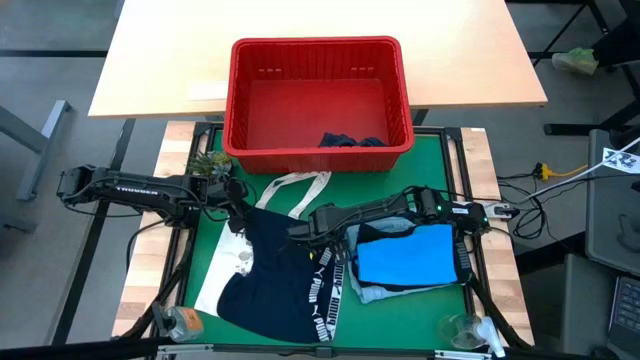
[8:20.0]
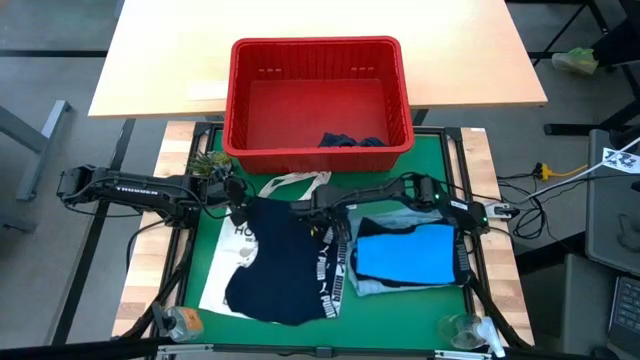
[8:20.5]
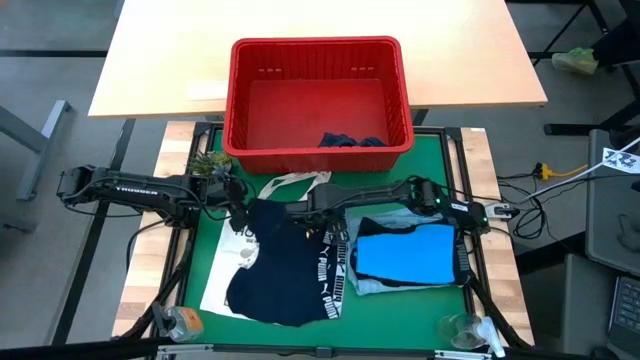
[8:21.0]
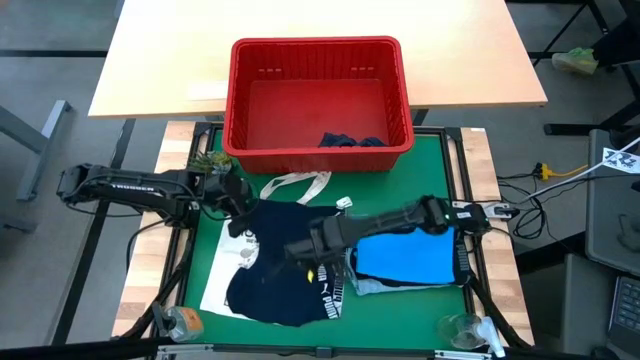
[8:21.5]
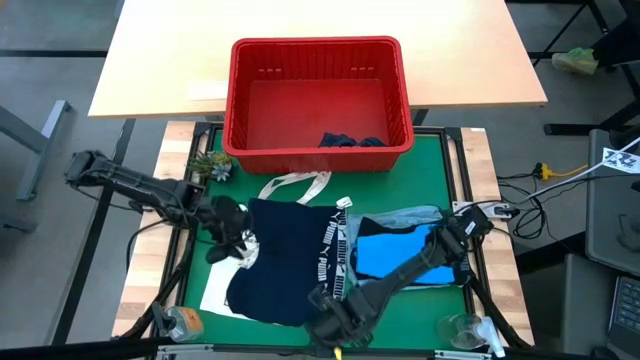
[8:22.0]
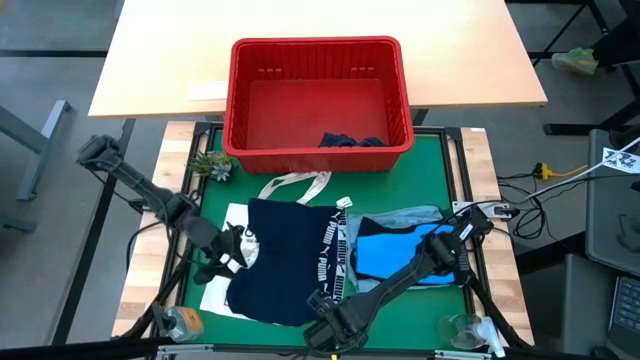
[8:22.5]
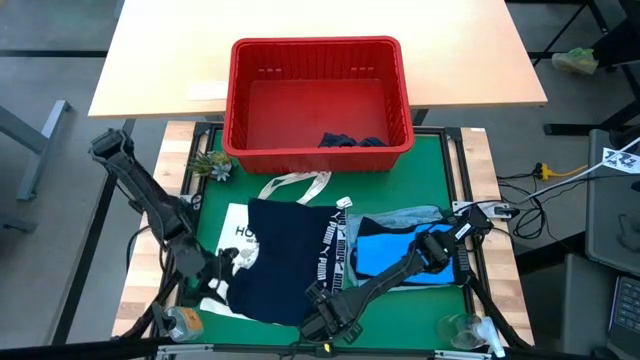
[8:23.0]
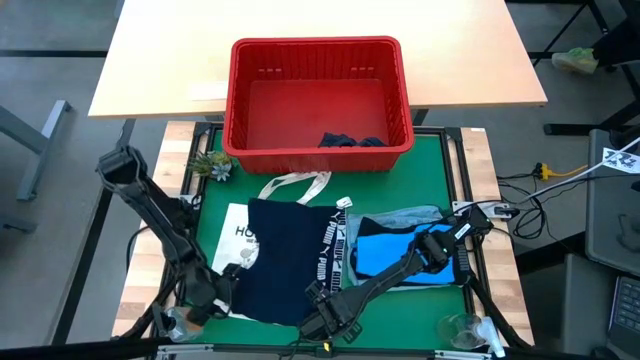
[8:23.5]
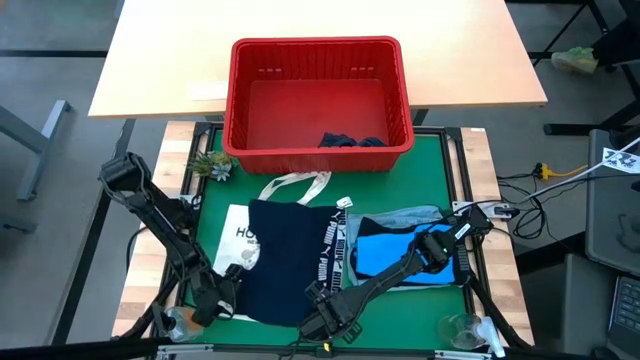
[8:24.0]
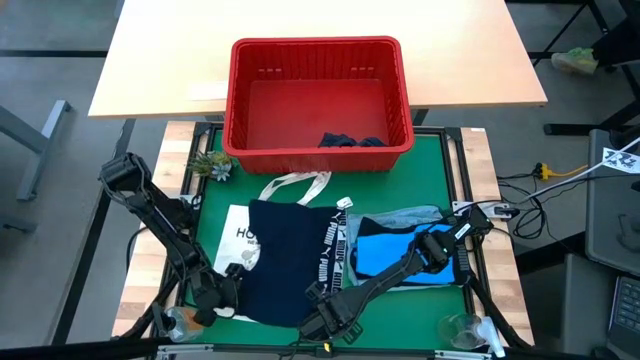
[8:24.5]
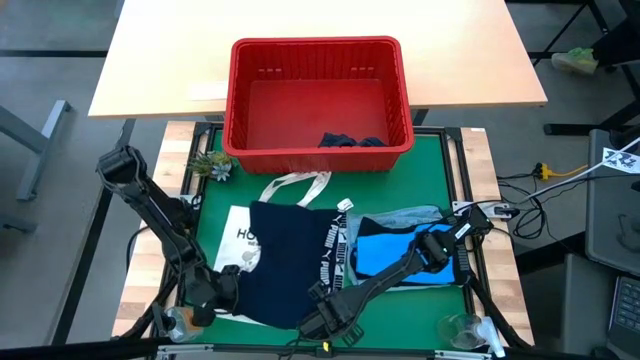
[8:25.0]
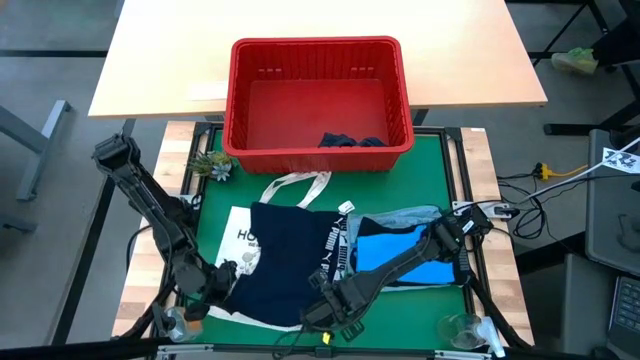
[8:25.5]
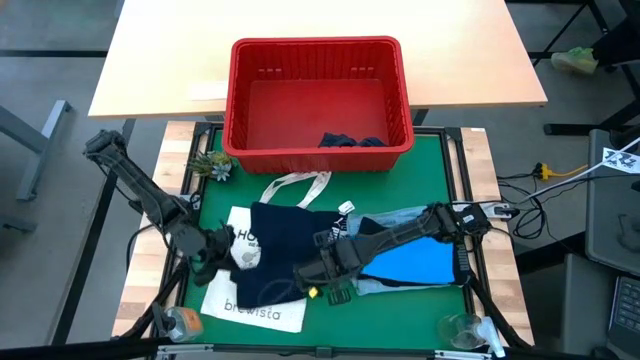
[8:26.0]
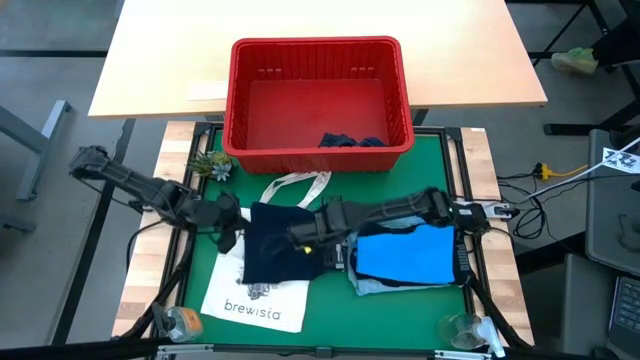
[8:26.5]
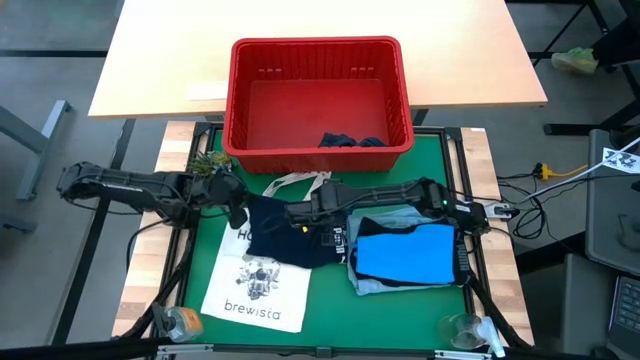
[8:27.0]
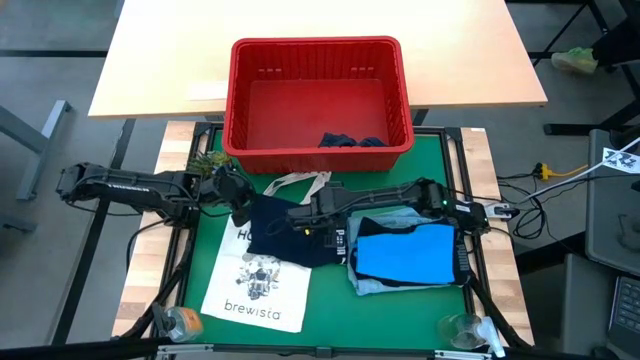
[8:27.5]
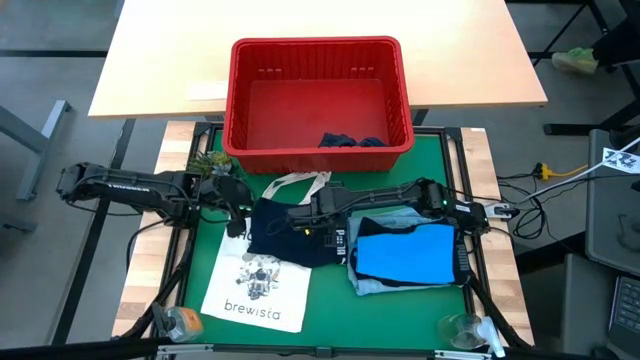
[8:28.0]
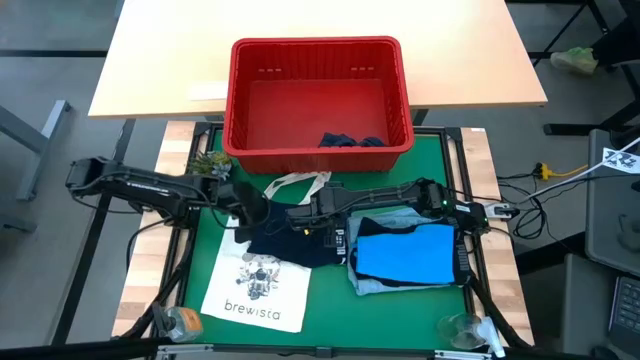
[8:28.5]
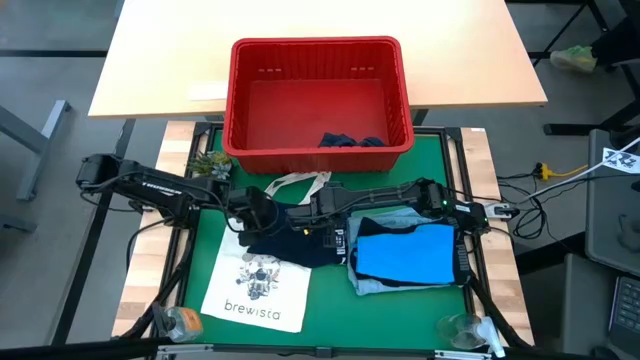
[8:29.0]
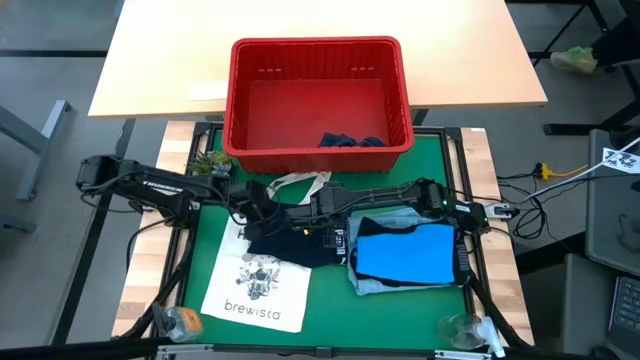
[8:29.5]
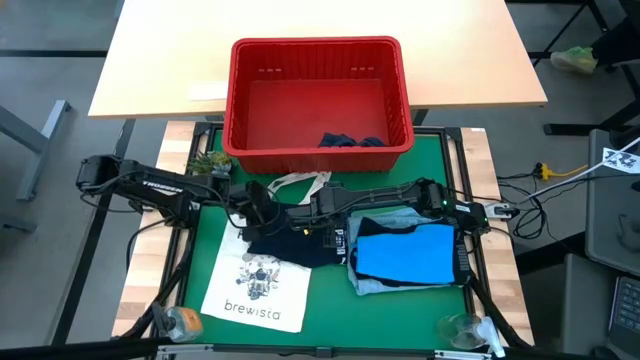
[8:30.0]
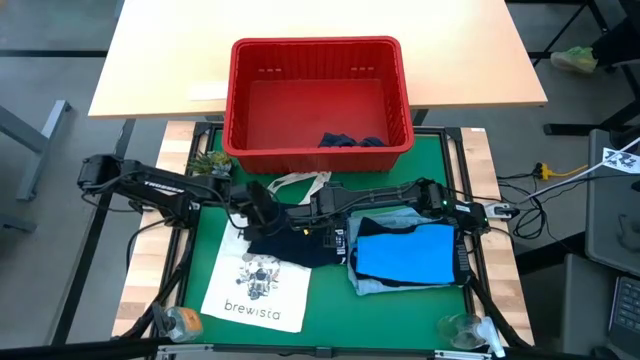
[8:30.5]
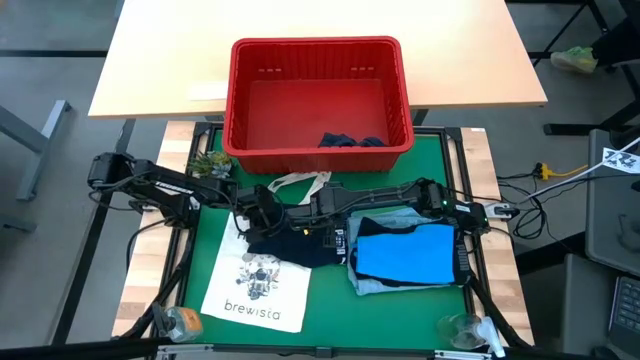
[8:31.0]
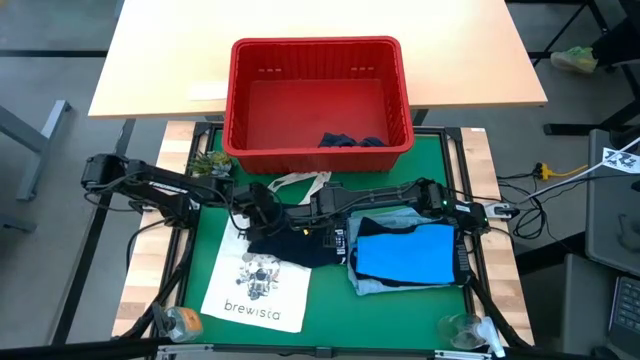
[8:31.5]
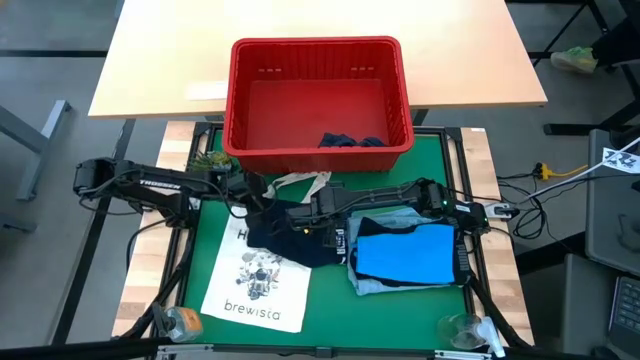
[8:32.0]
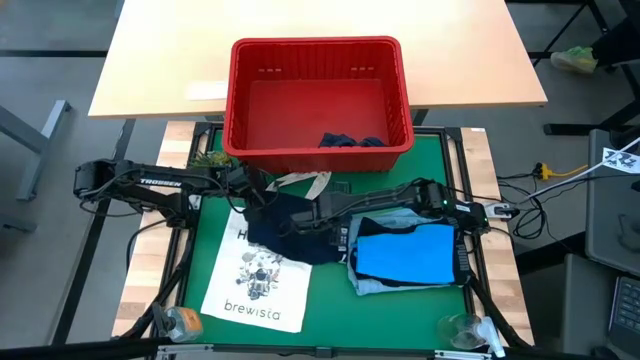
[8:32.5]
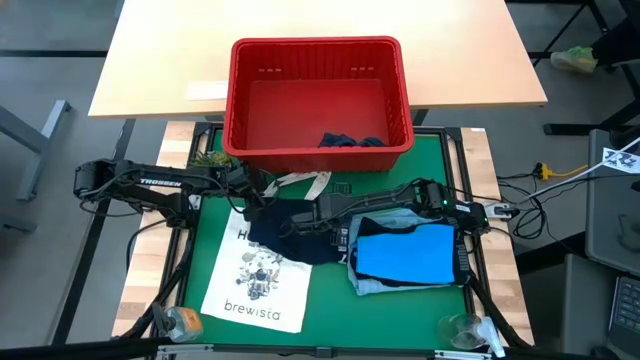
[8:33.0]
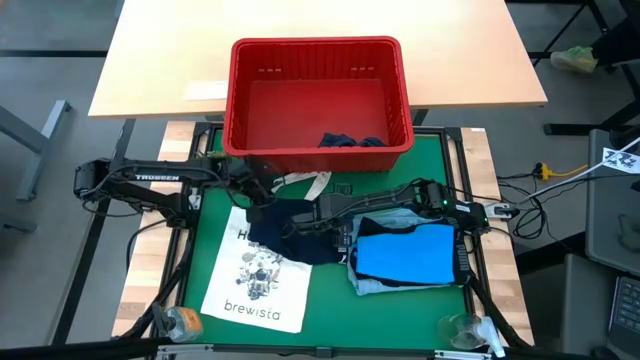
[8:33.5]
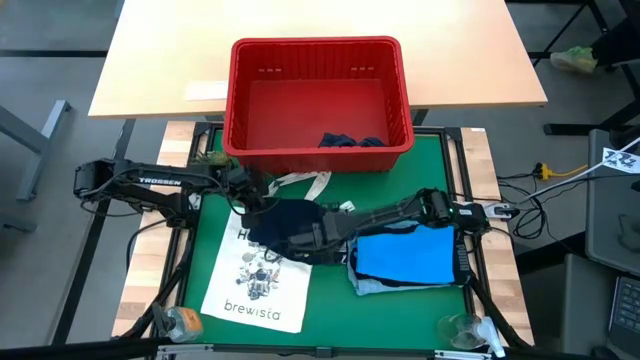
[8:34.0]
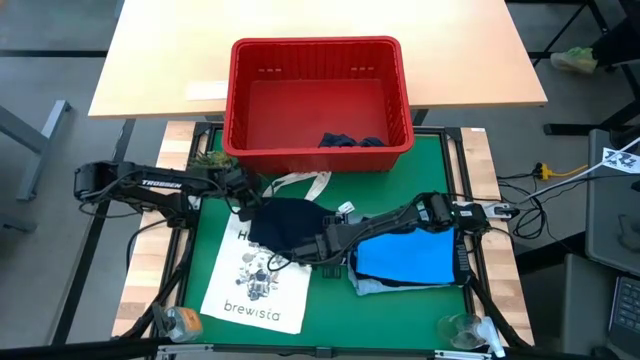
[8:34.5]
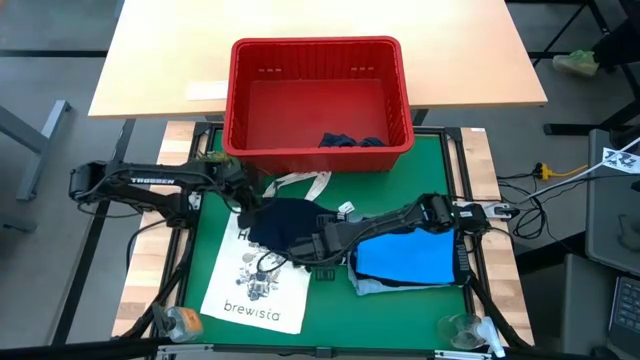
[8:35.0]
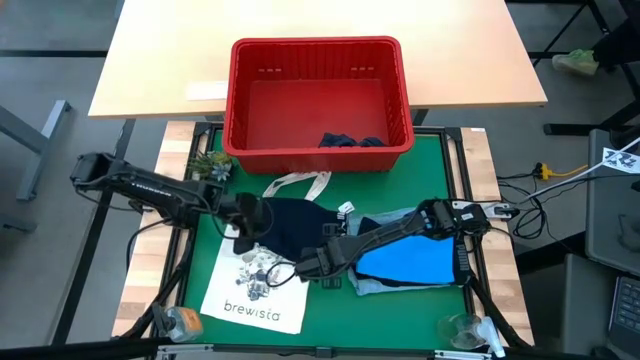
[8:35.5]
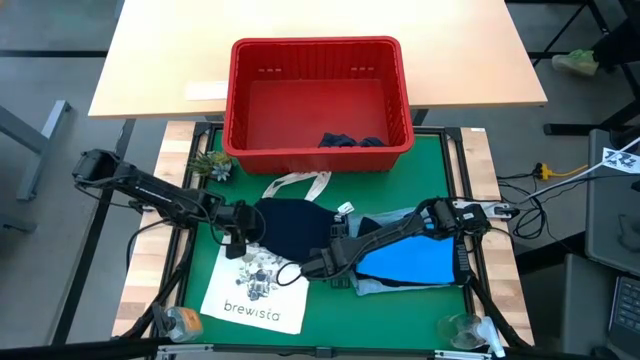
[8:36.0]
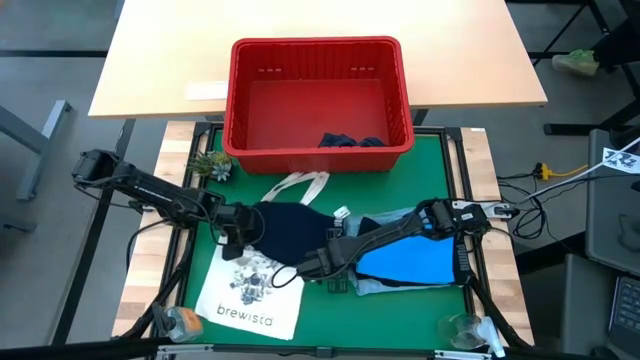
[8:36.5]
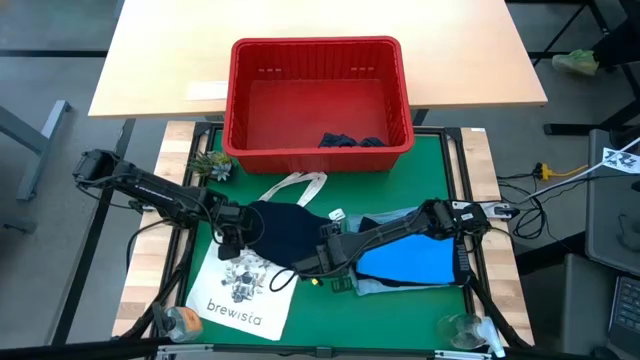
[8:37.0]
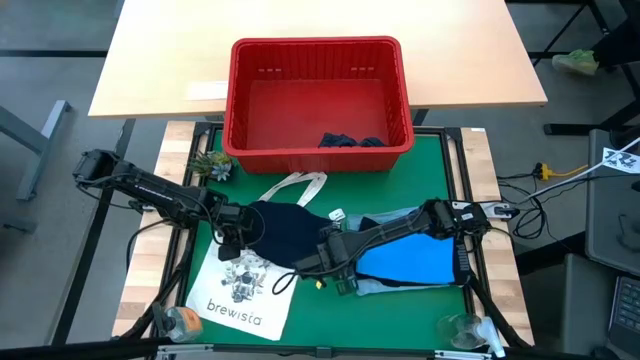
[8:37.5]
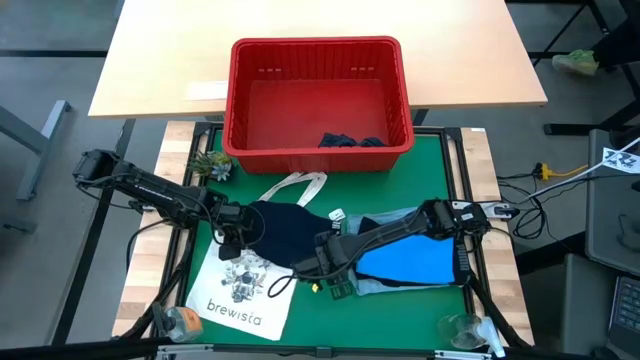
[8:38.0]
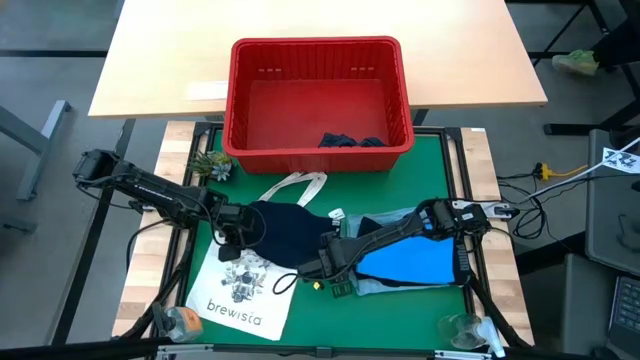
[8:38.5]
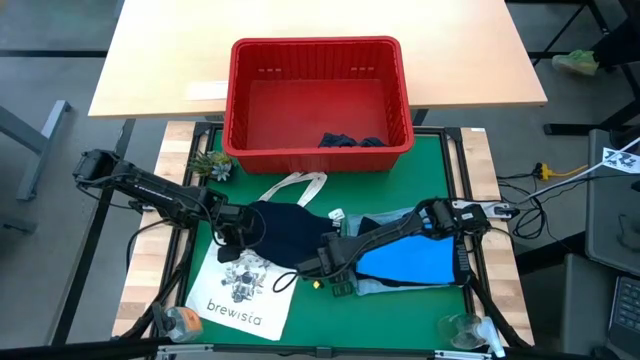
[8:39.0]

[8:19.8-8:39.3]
Task: Fold Laundry from Bin
Fold the dark blue boxer
